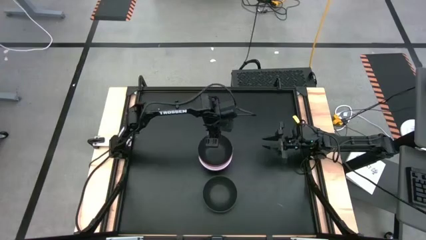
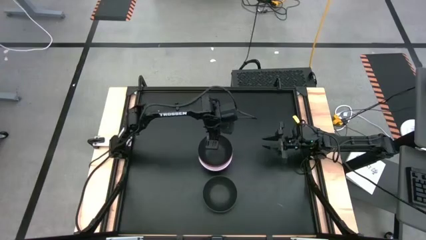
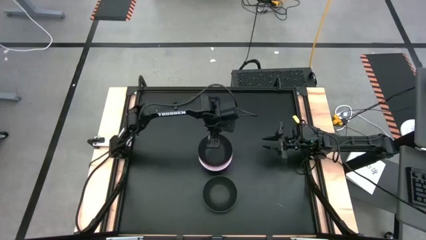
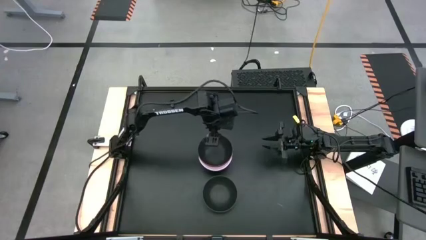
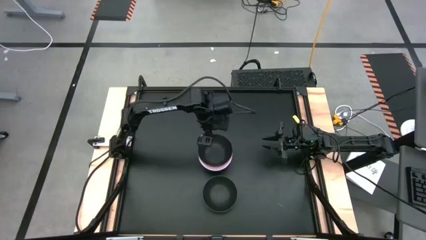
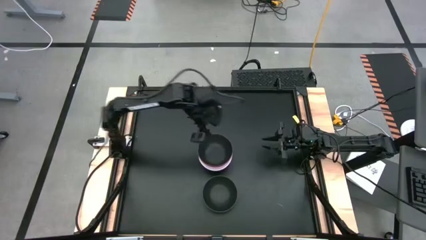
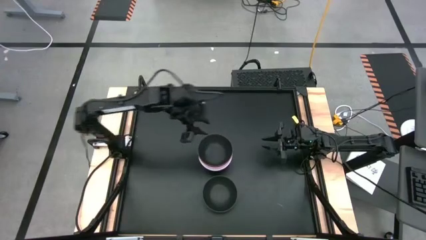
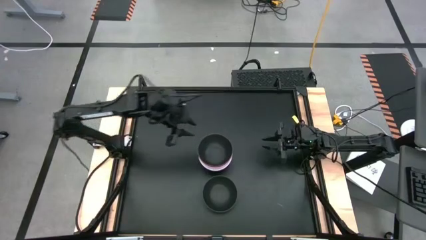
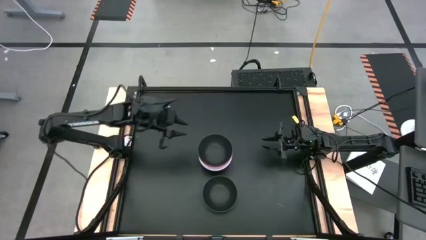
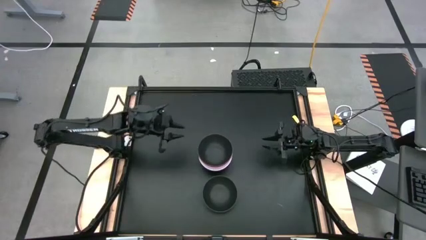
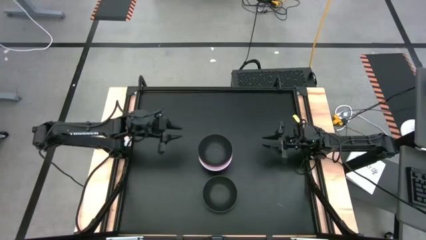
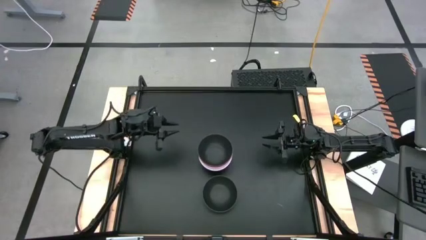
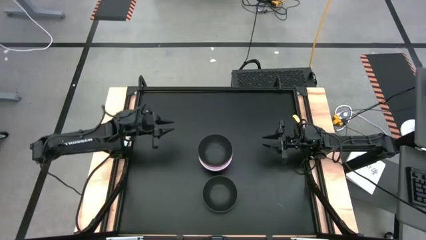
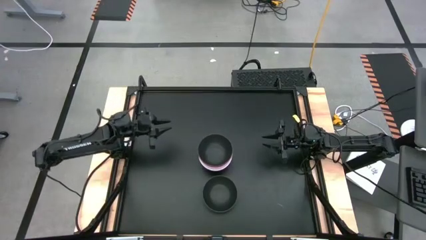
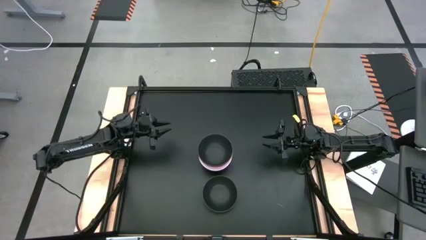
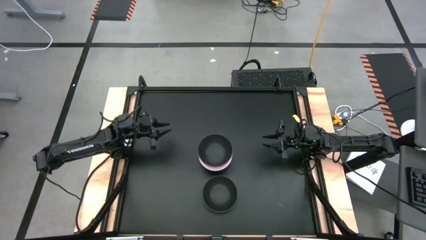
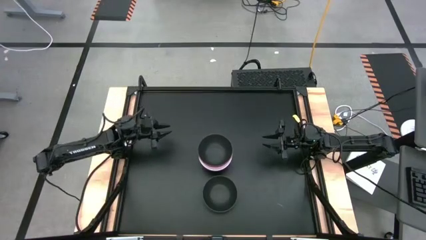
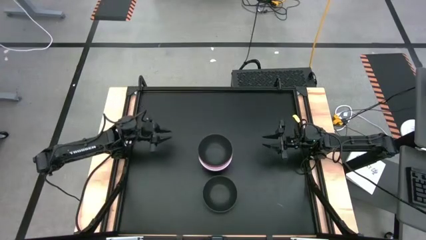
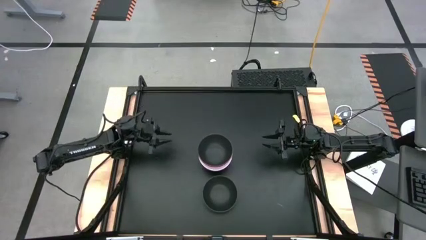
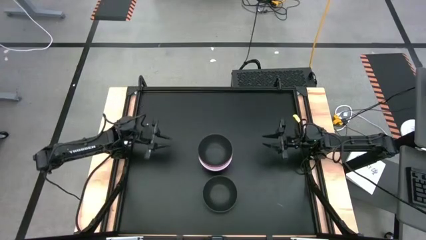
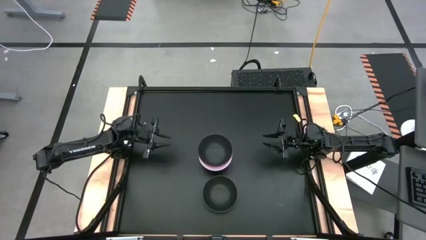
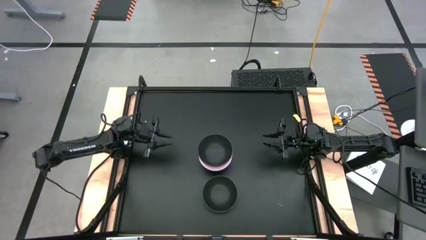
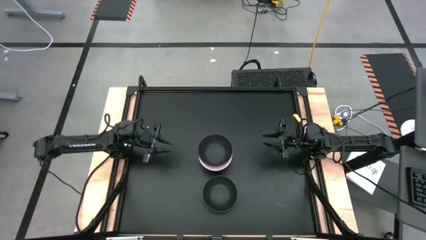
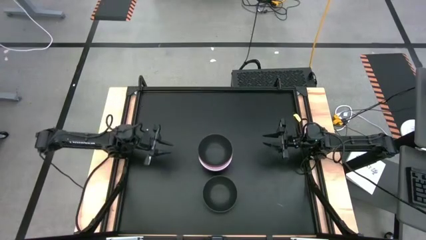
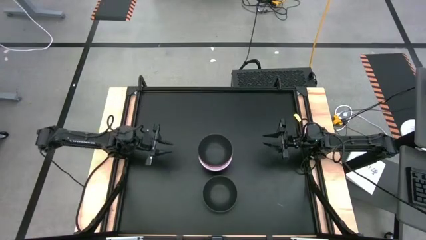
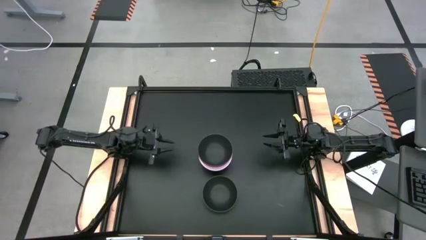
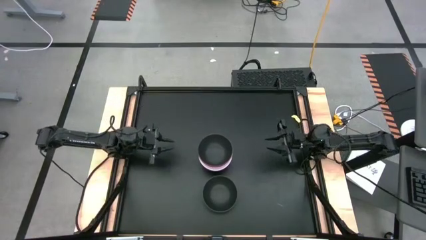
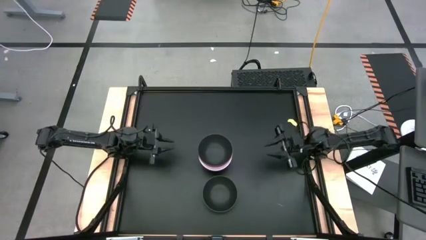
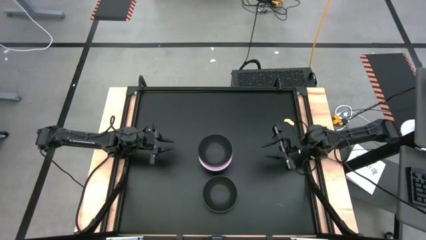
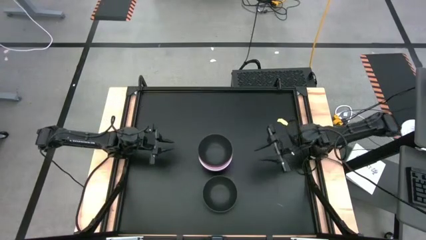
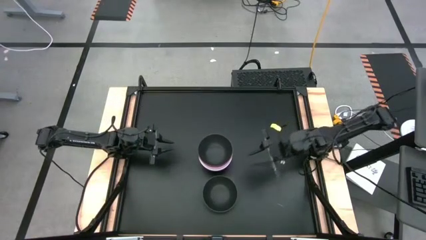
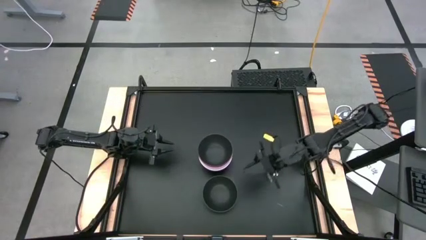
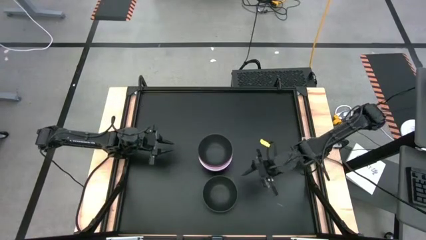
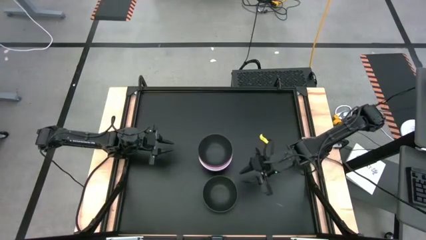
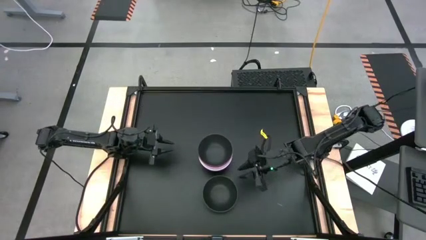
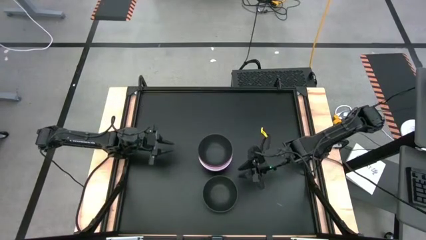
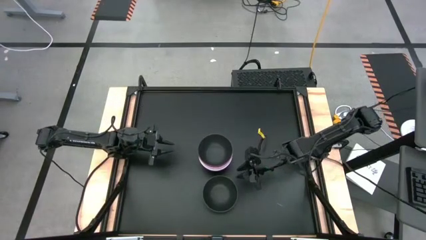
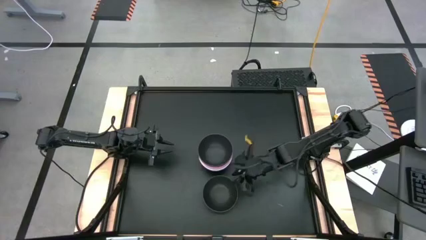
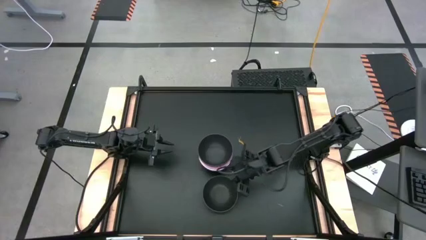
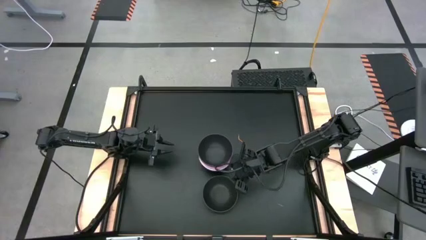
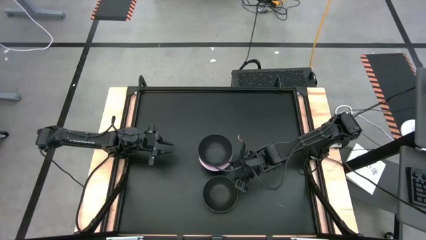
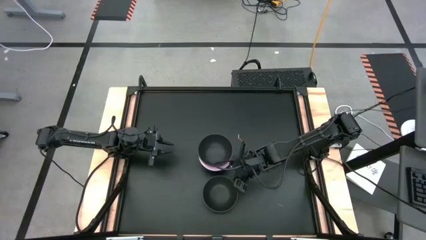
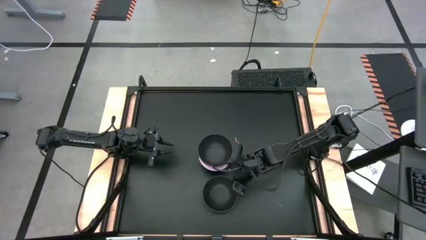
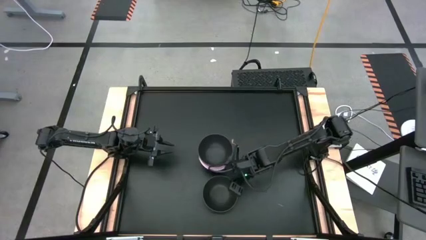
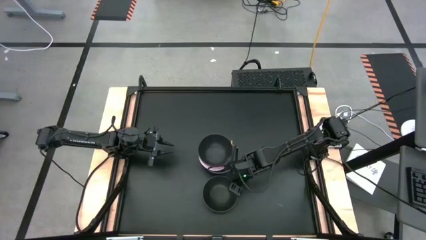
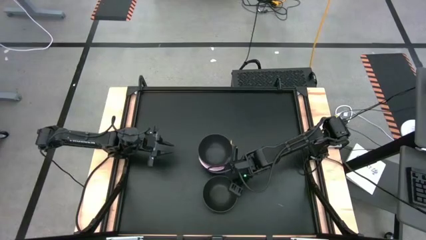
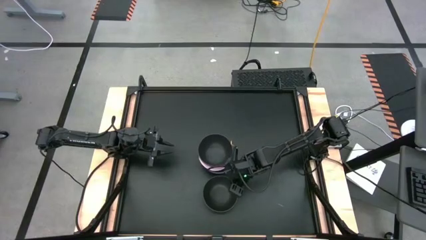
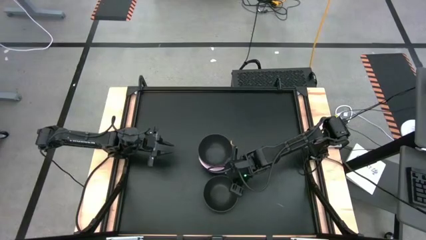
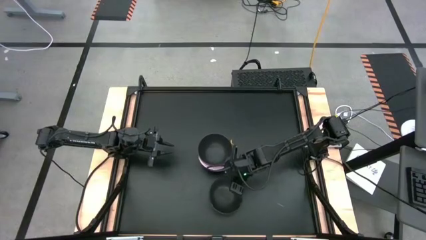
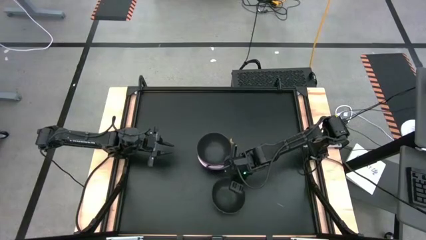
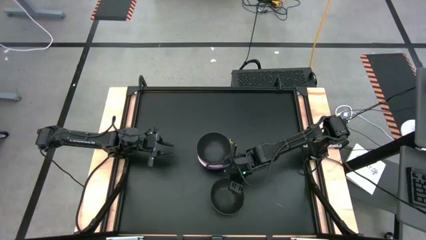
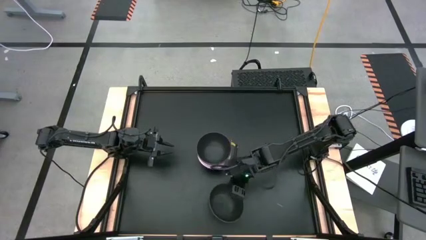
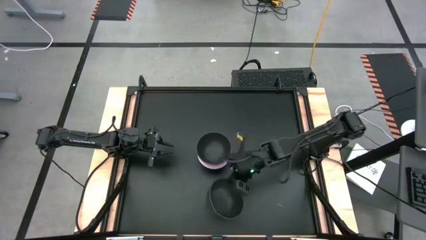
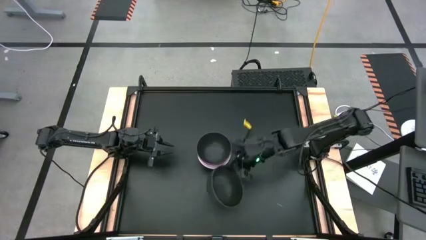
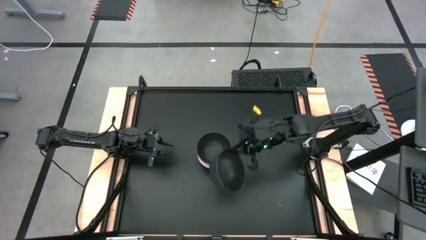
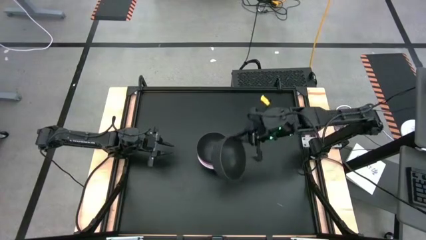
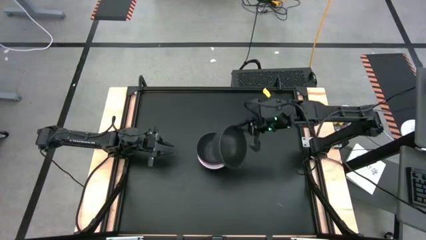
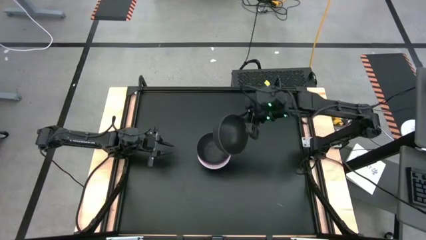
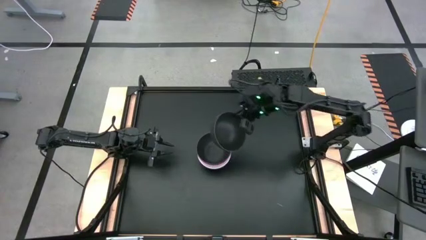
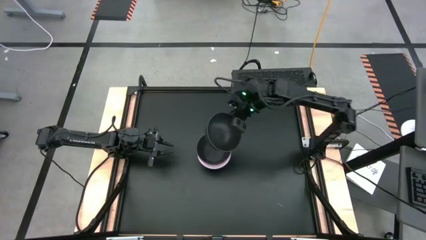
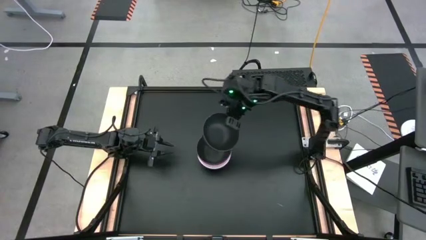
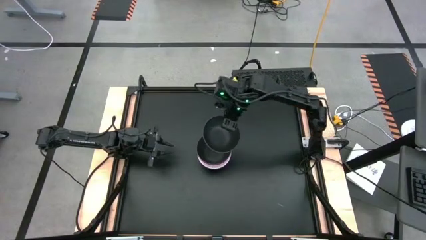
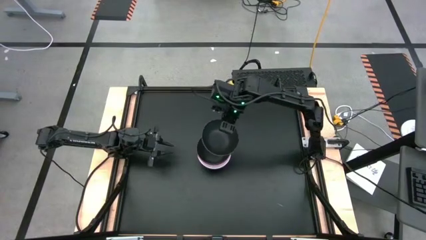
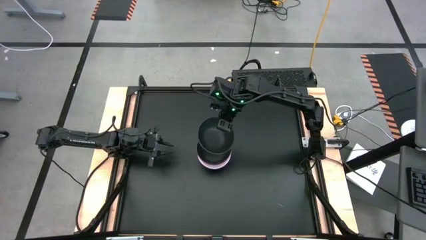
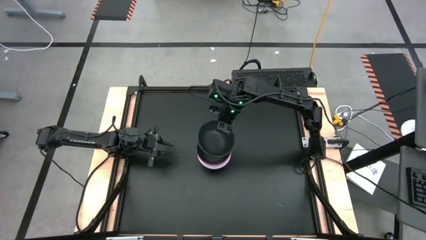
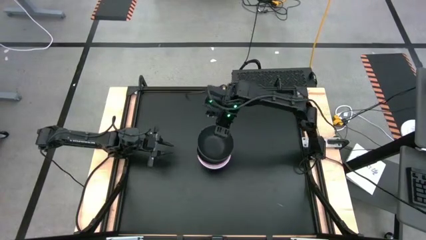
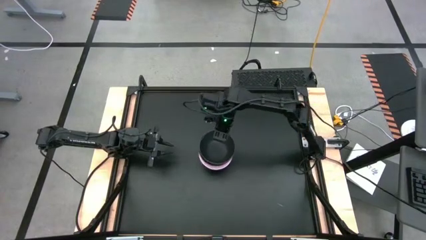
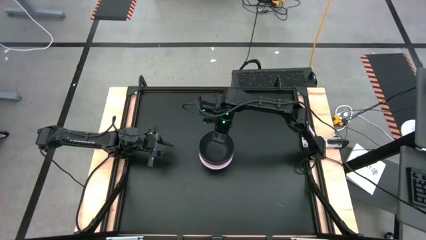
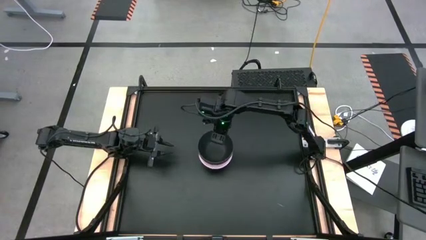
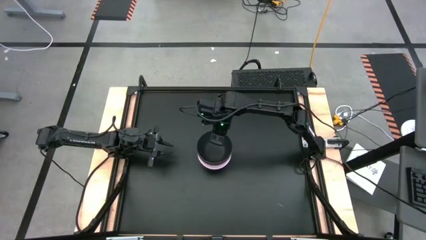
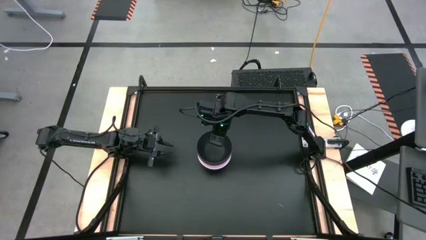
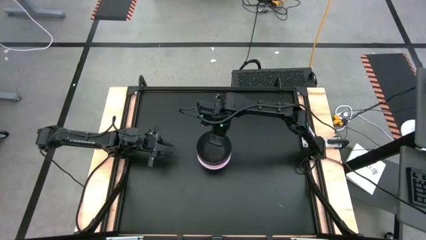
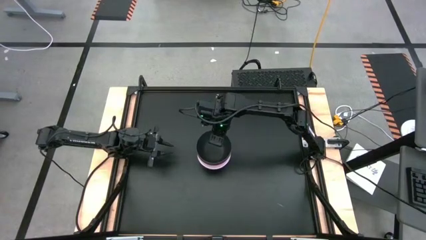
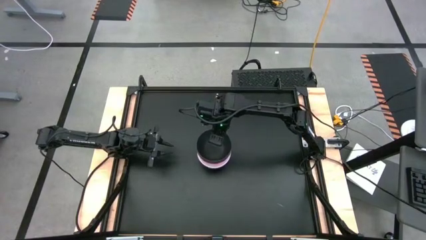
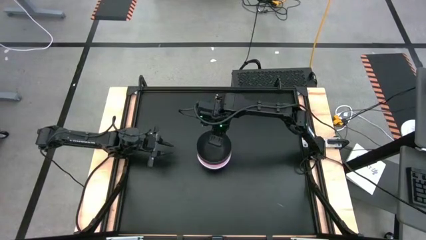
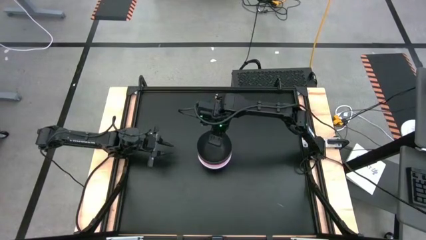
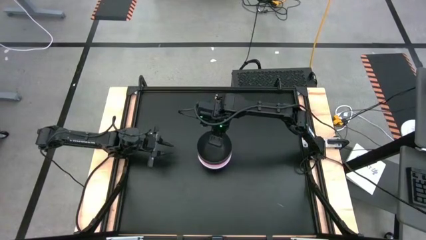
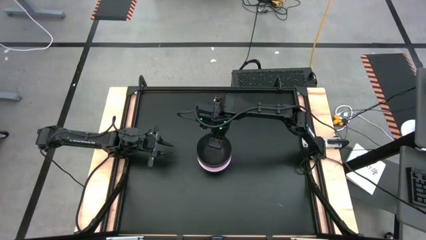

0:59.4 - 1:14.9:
Task: Nest bowls inside each other
Stack the black bowl on top of the black bowl

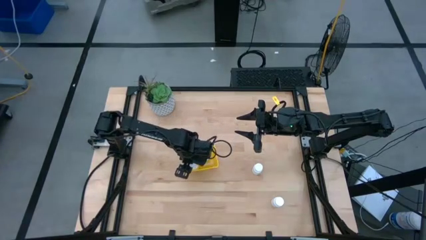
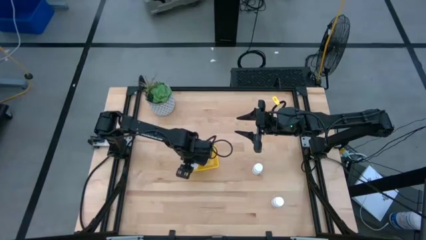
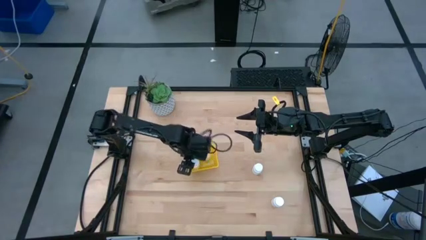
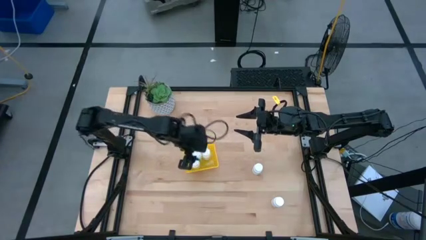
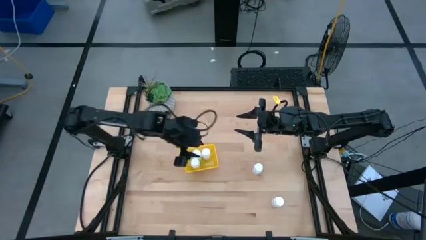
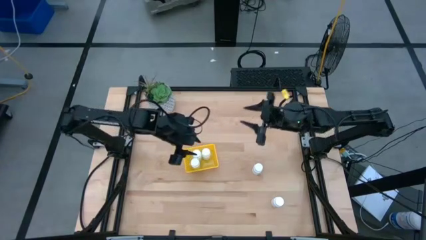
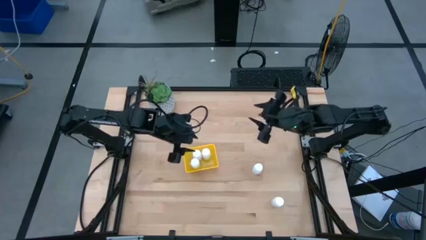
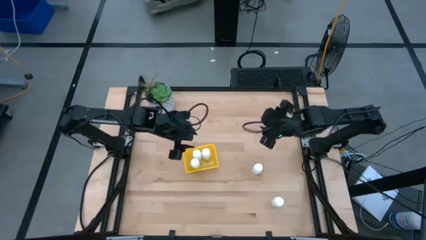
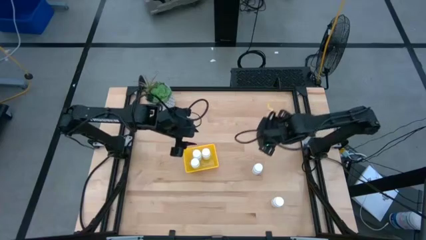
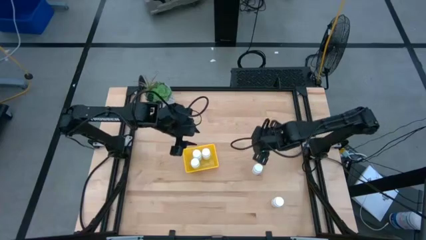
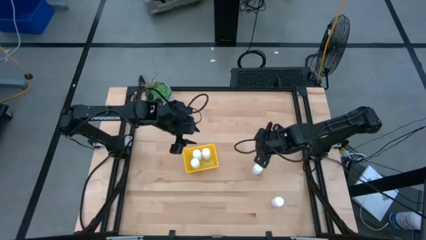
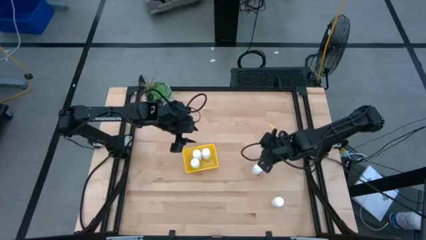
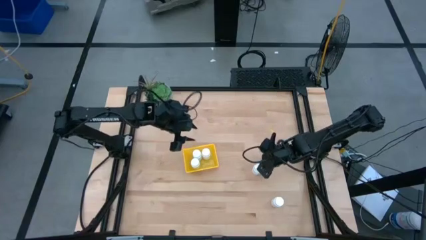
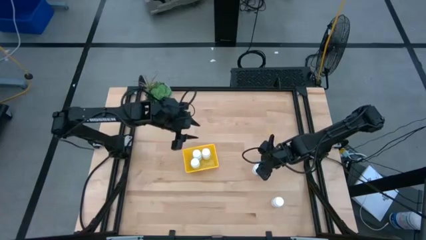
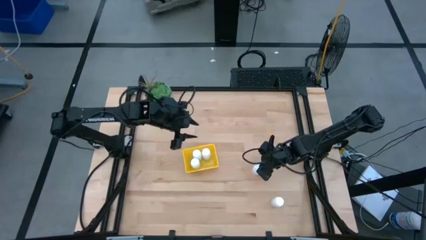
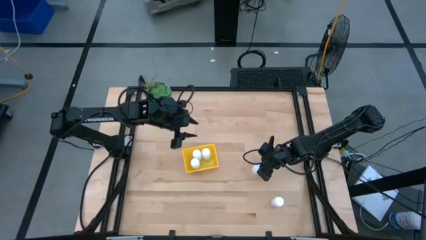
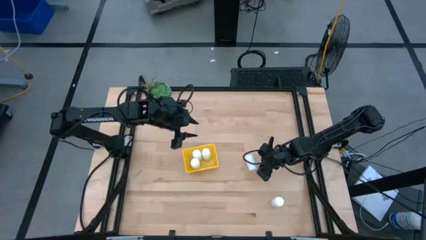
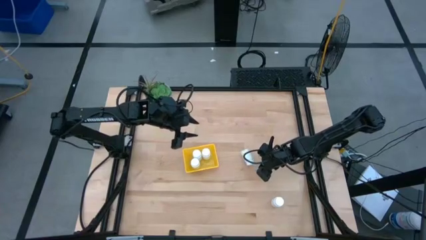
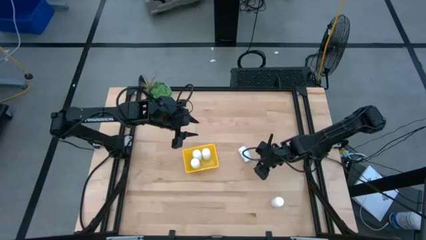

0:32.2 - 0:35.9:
Task: Pick and place pill bottles into a basket
Put the white medicine bottle into the yellow bin
